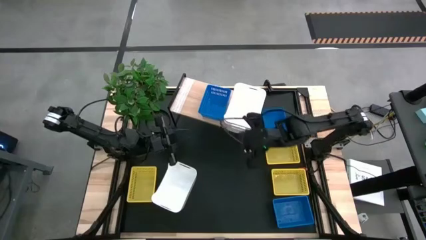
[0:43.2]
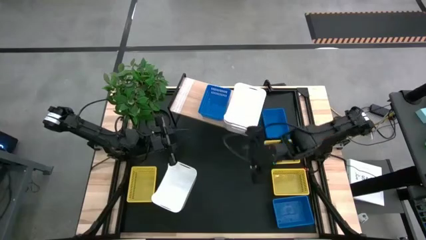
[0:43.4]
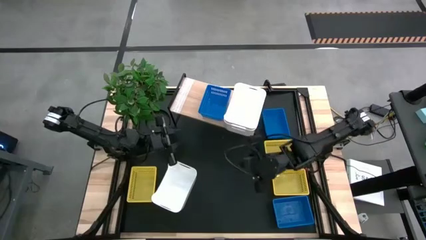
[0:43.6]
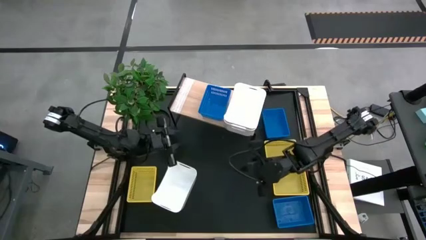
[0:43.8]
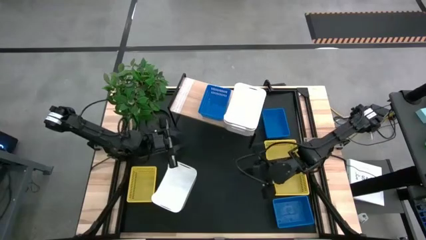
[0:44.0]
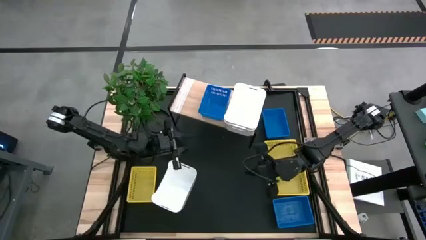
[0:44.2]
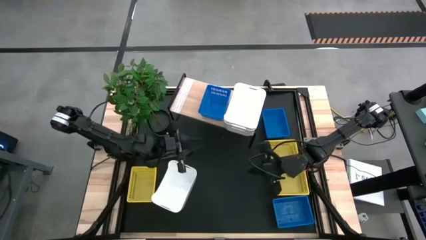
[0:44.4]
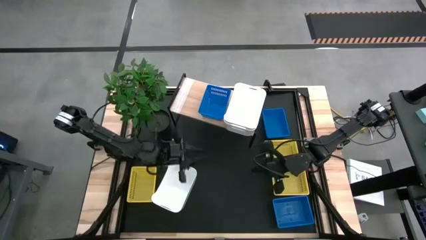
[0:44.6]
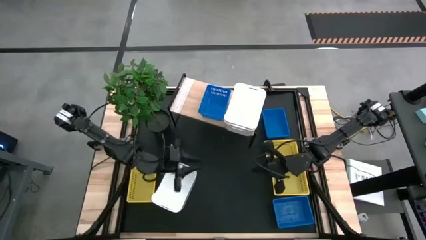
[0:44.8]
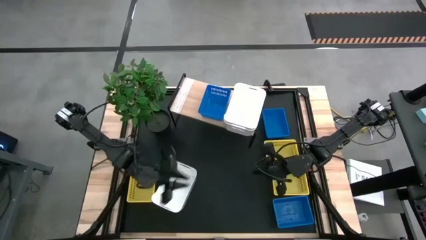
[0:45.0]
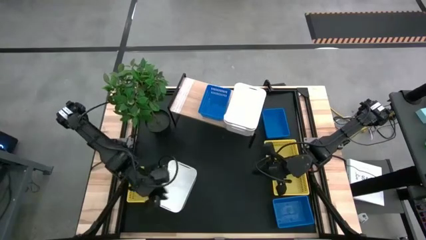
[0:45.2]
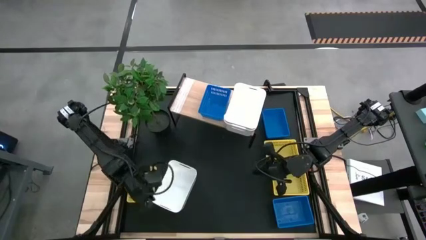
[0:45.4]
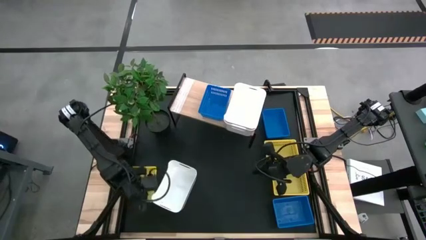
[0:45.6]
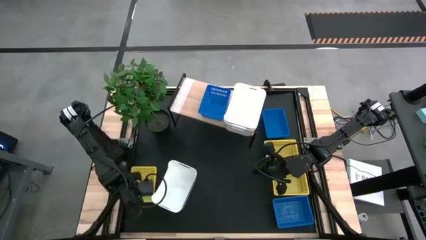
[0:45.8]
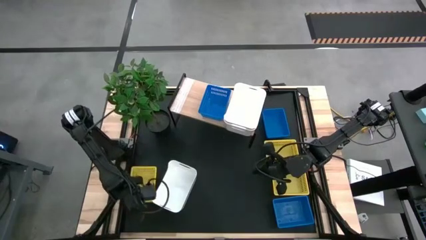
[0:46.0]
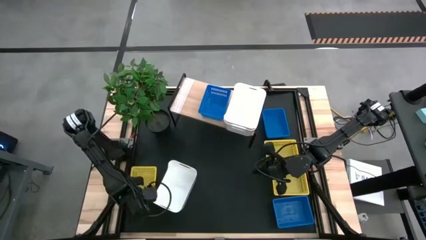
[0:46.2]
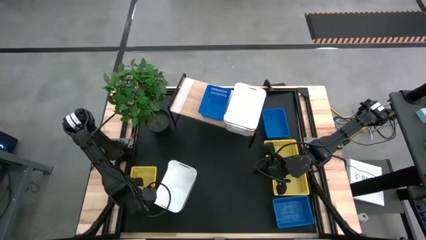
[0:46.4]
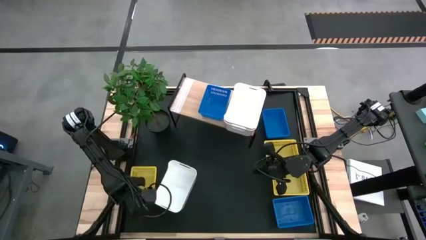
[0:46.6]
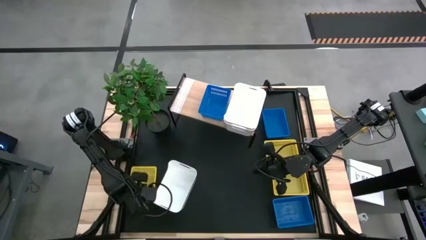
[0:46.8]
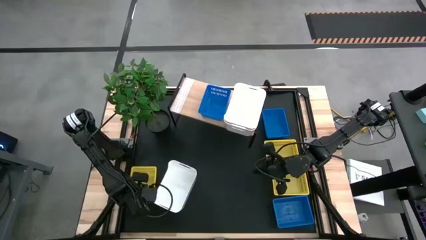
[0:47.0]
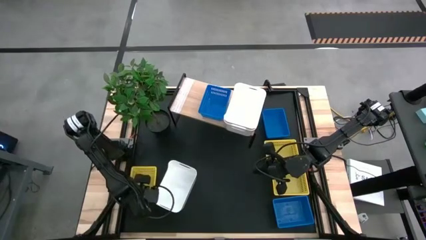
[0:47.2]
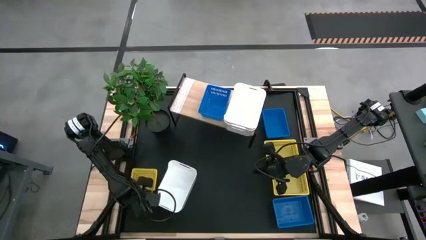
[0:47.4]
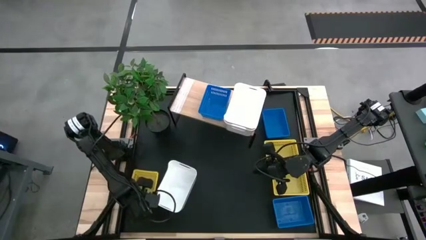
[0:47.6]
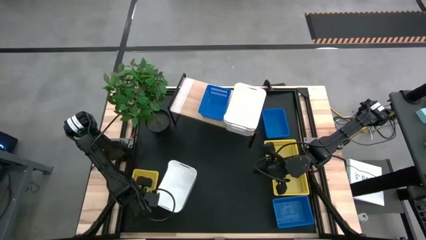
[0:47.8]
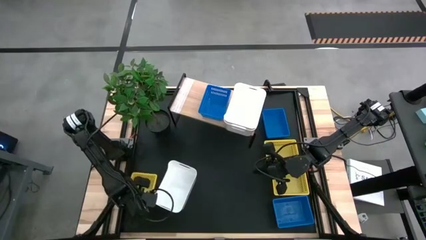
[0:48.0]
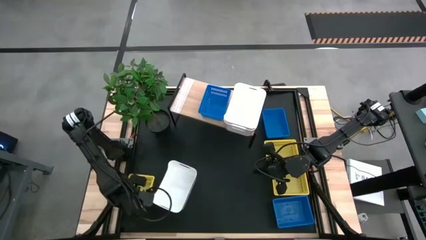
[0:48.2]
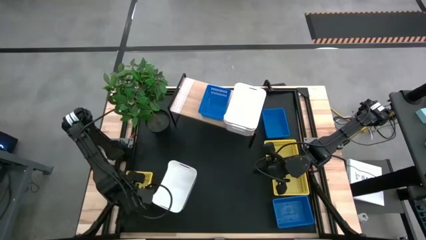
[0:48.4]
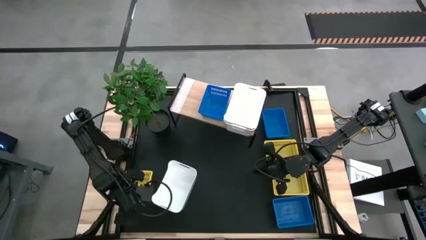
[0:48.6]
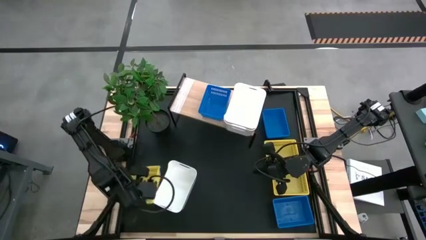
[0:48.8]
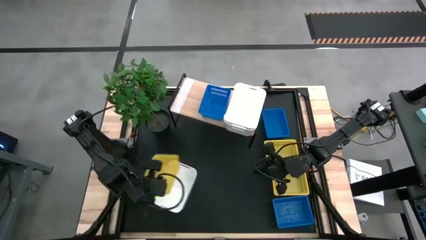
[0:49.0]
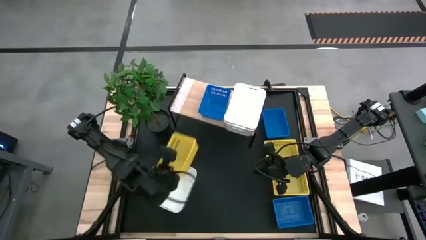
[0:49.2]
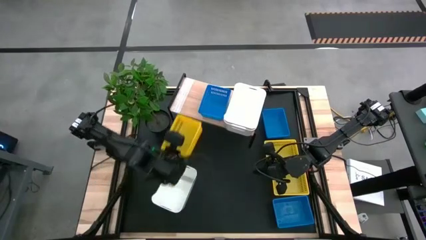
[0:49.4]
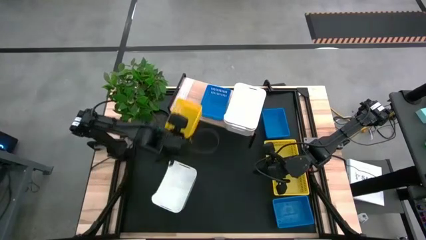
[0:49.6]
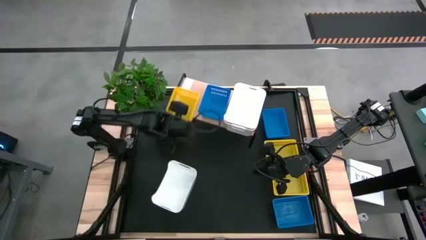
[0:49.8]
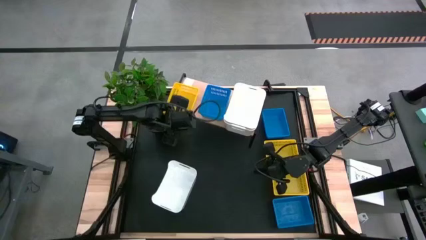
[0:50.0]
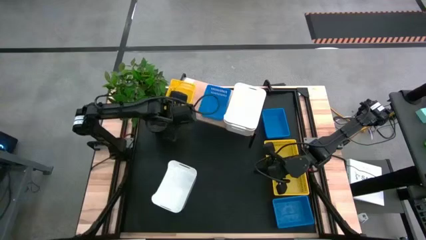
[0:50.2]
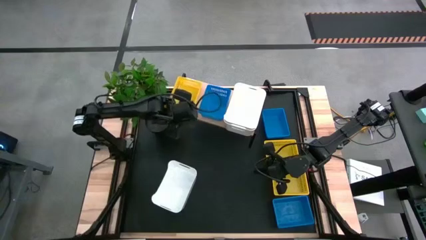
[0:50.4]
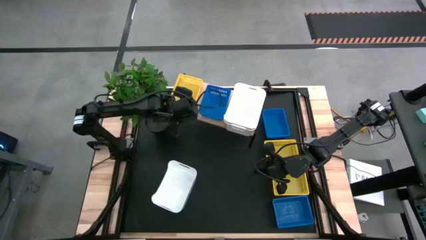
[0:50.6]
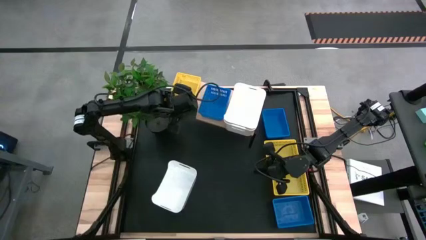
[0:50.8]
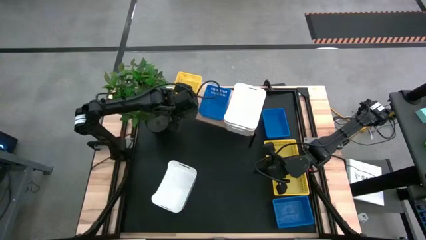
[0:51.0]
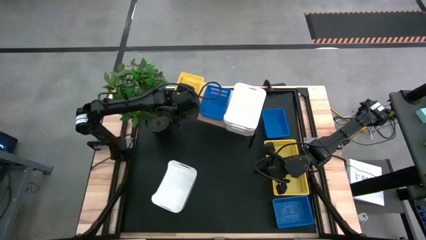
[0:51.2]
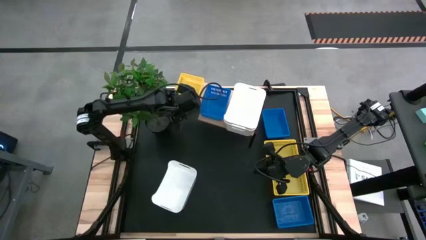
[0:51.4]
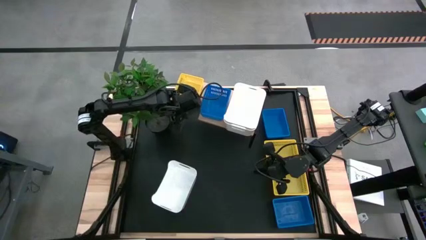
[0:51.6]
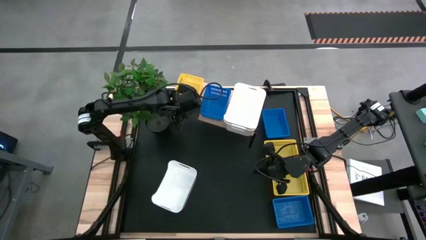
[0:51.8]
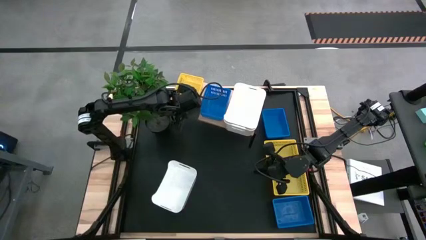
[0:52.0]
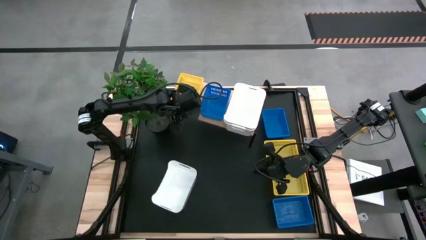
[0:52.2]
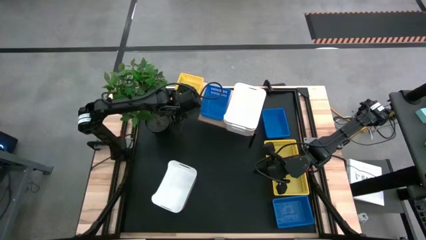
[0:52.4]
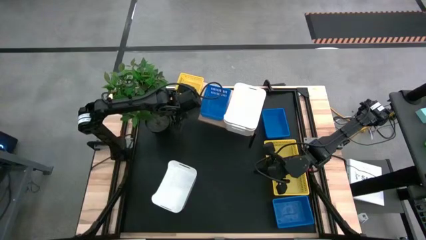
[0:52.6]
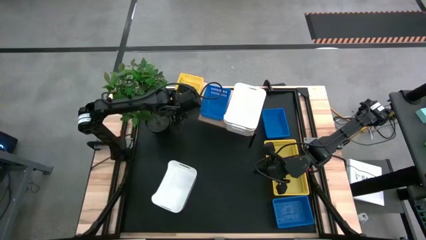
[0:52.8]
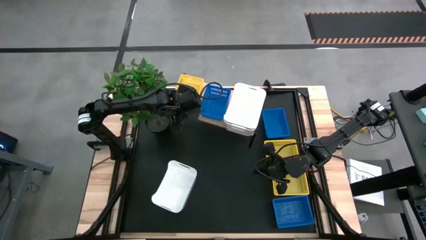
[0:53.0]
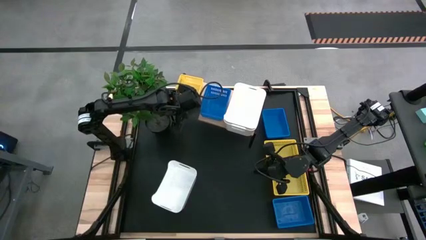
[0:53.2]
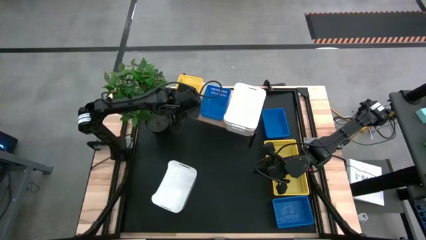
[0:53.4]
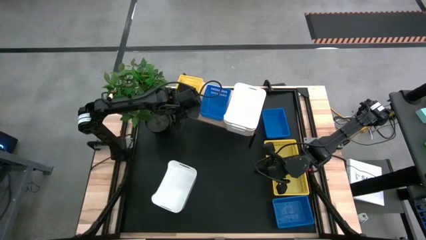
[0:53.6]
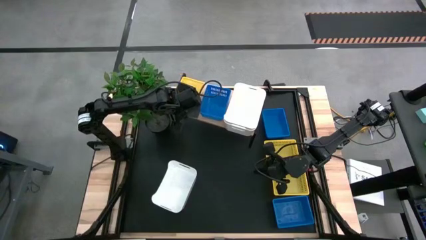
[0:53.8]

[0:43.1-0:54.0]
Task: Stack baskets on shelf by color
Put the left yellow bin on the shelf
